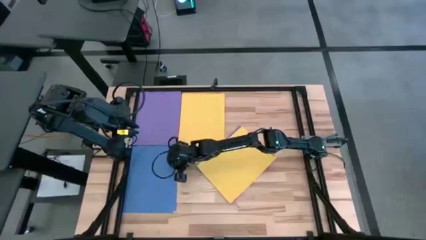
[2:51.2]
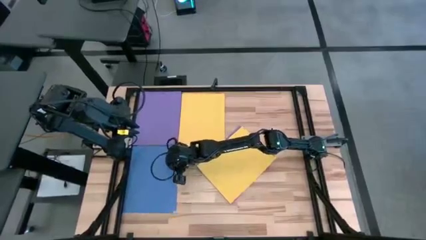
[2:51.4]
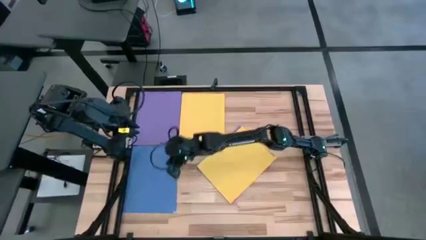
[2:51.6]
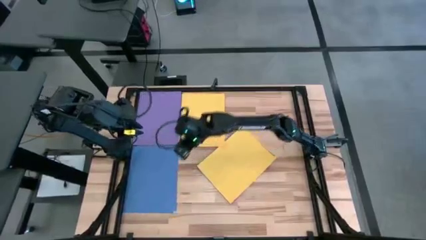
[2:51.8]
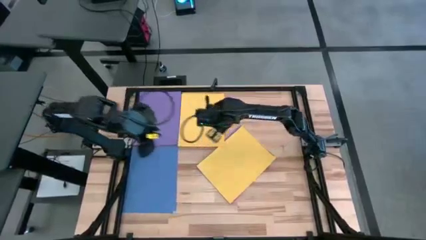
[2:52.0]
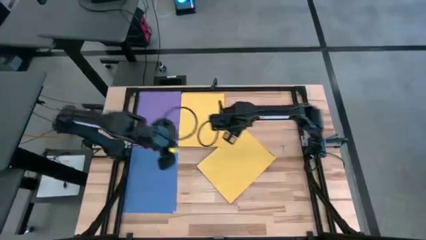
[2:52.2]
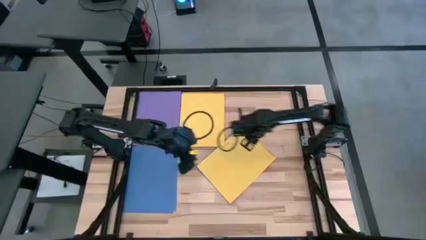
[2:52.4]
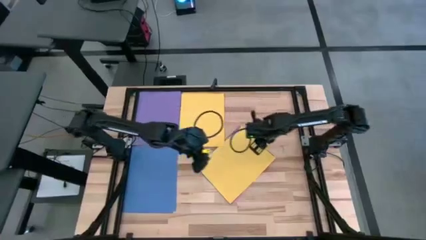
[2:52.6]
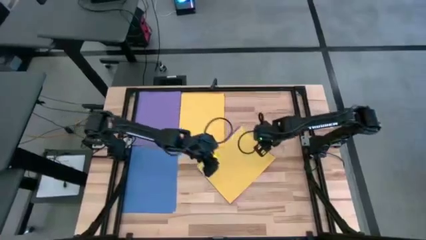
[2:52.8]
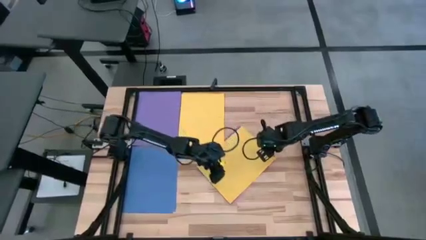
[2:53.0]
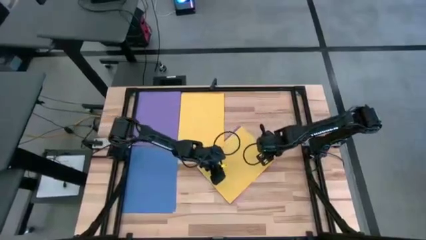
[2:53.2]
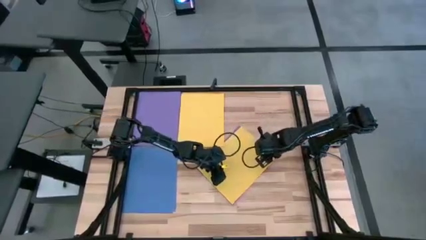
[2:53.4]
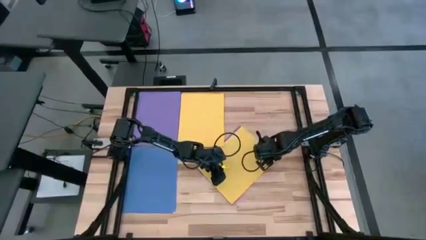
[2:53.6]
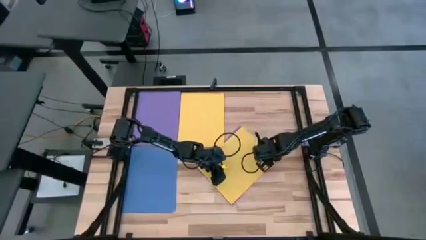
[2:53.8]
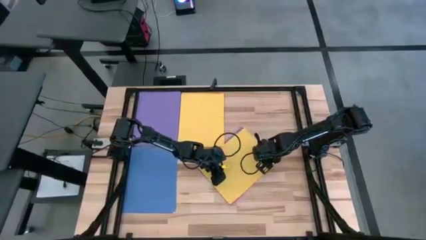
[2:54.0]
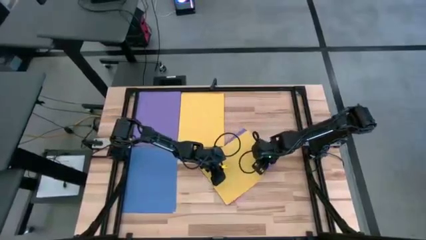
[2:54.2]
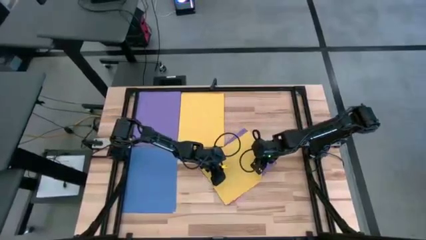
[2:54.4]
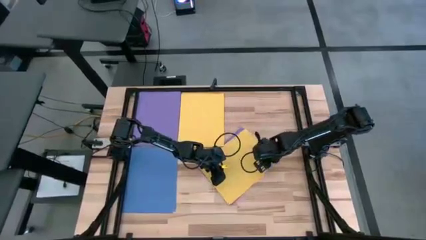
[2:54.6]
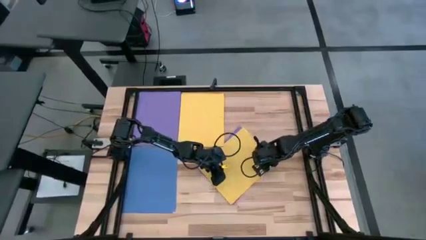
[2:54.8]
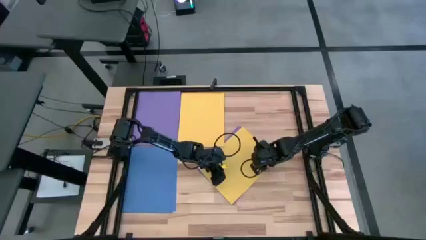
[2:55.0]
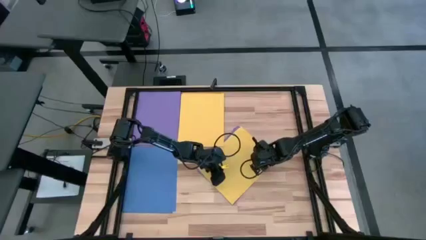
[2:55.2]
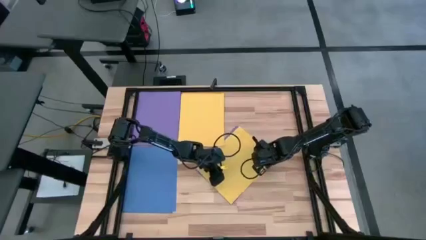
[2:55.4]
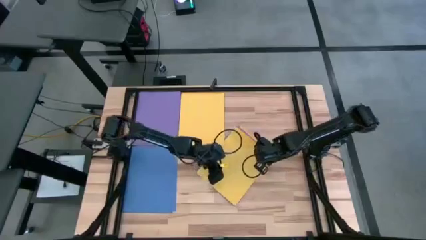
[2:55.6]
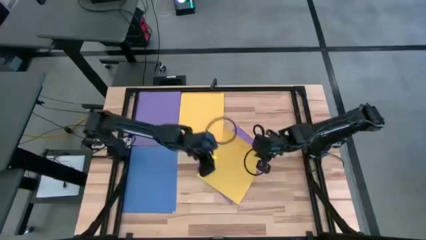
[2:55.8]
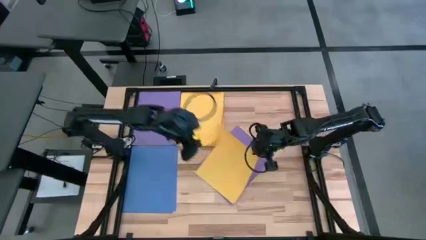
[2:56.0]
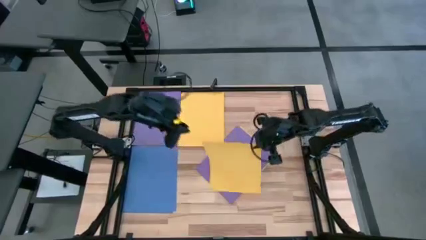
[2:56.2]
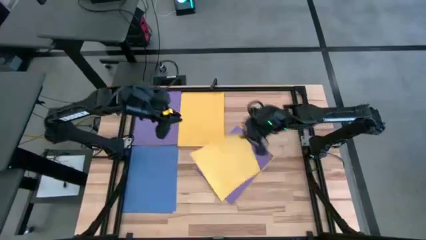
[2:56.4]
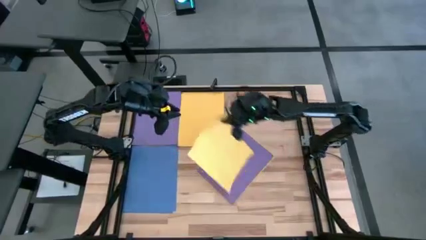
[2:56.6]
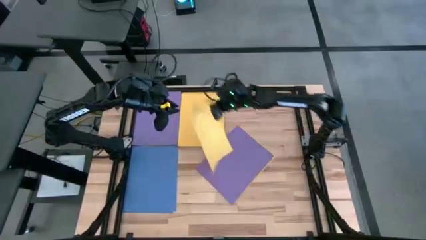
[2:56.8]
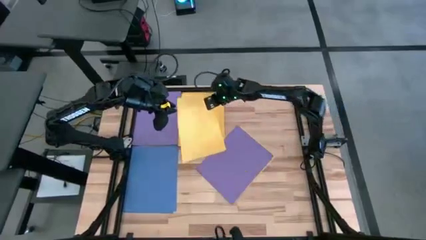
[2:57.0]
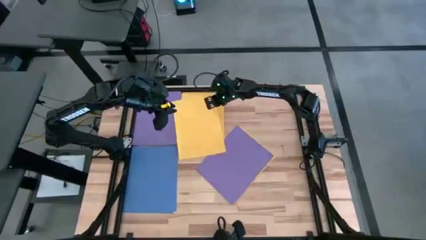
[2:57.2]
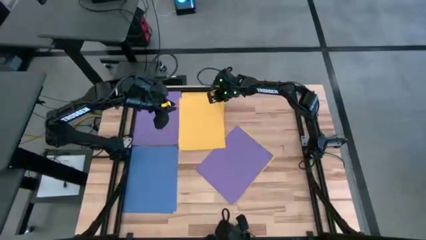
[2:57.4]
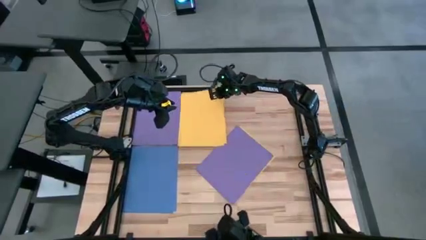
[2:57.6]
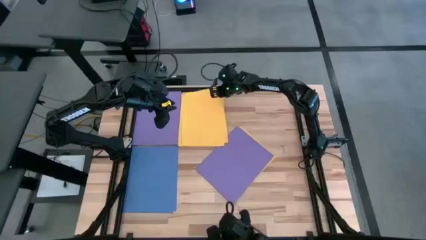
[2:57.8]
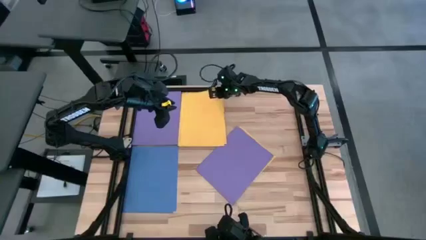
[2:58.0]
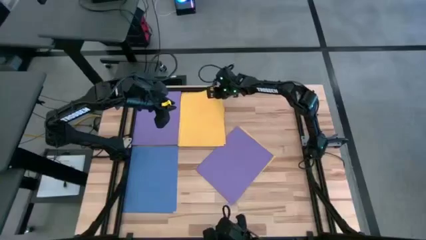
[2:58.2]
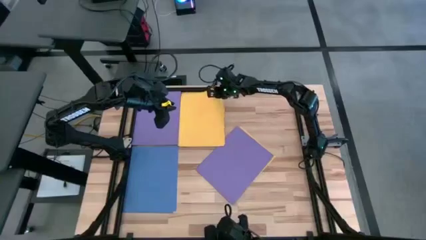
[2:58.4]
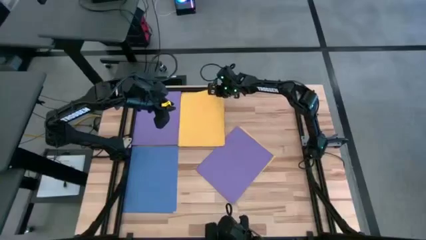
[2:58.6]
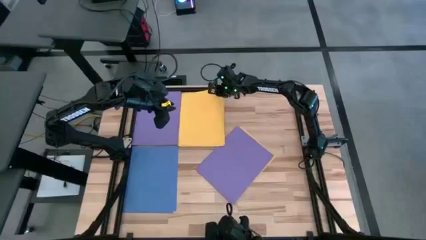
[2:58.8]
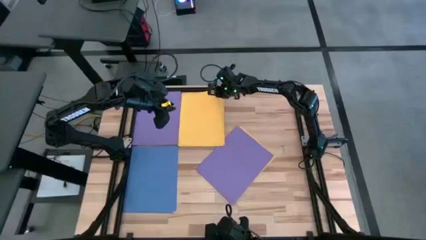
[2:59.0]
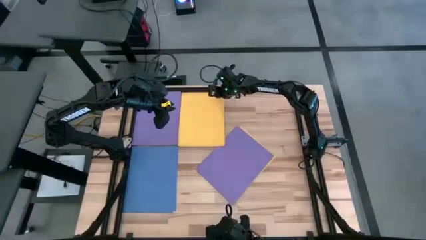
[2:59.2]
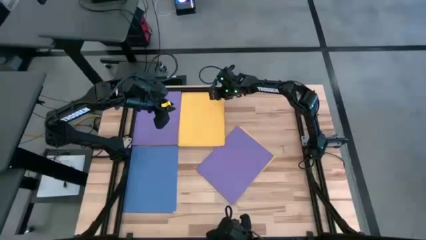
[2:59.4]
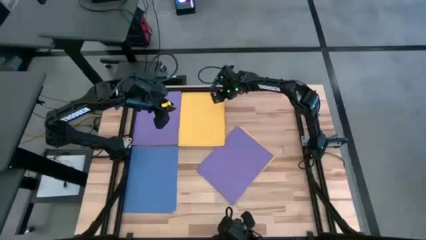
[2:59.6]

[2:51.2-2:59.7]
Task: Organize paper
Stack the yellow paper on top of the yellow paper

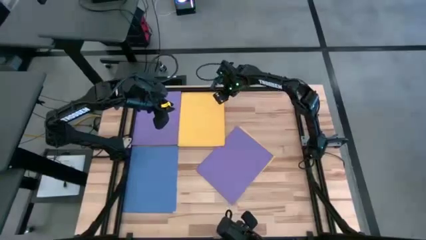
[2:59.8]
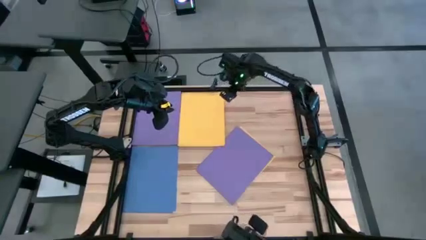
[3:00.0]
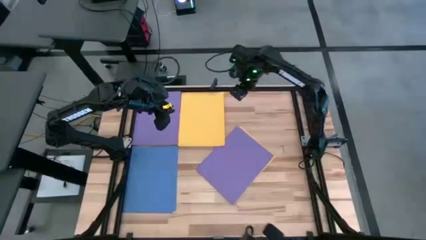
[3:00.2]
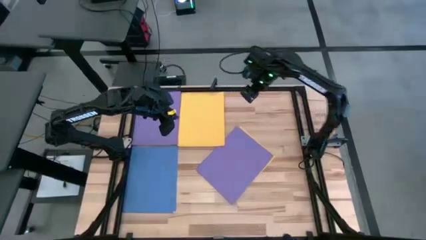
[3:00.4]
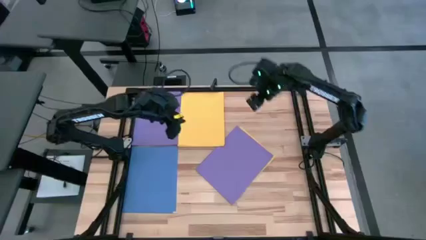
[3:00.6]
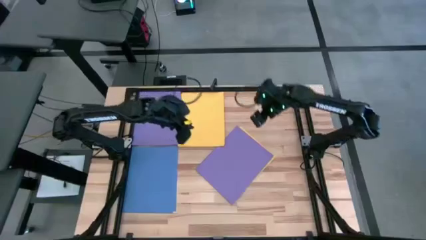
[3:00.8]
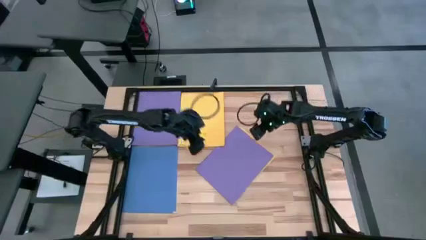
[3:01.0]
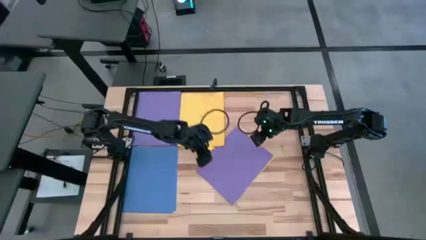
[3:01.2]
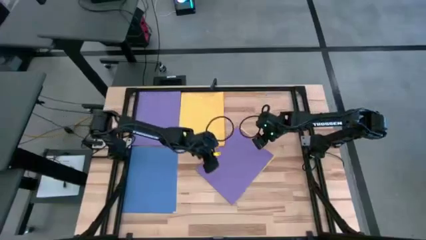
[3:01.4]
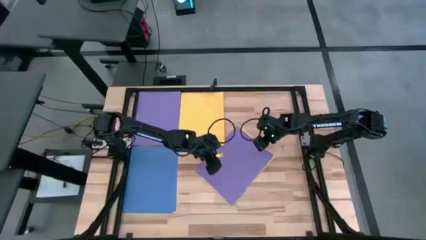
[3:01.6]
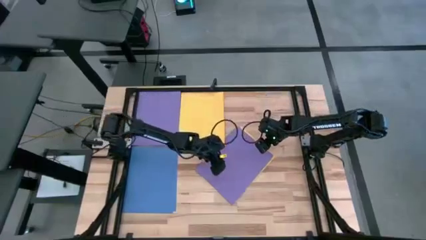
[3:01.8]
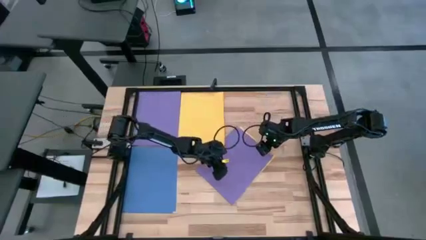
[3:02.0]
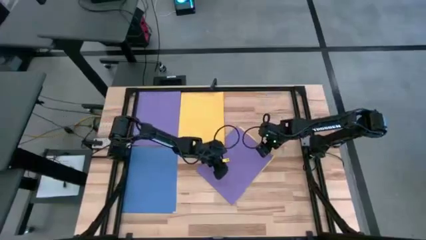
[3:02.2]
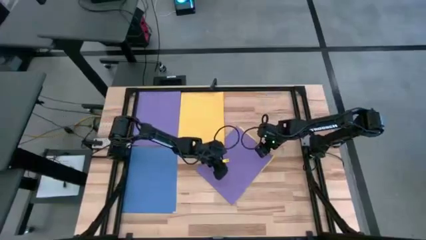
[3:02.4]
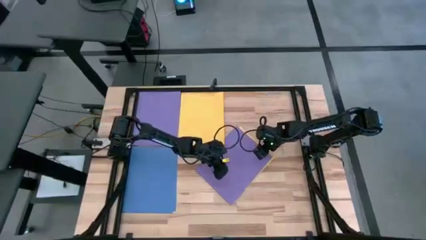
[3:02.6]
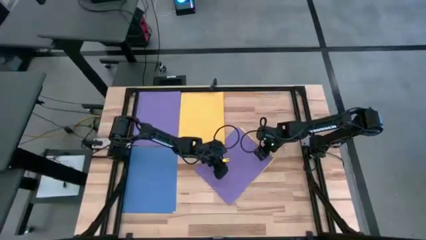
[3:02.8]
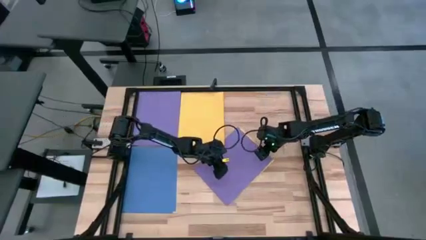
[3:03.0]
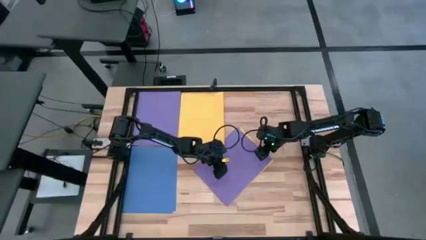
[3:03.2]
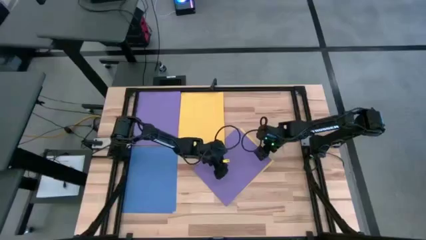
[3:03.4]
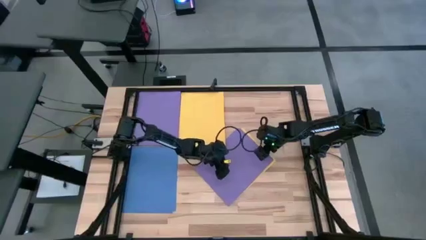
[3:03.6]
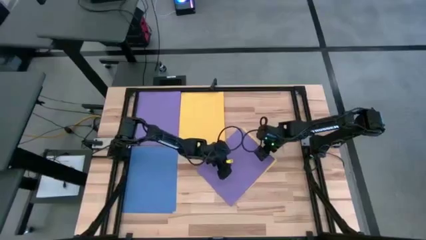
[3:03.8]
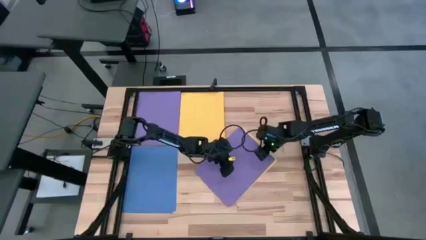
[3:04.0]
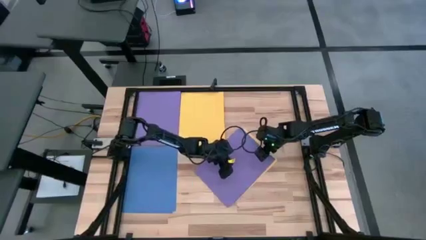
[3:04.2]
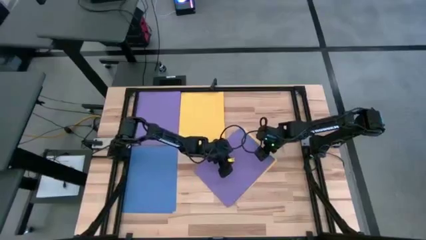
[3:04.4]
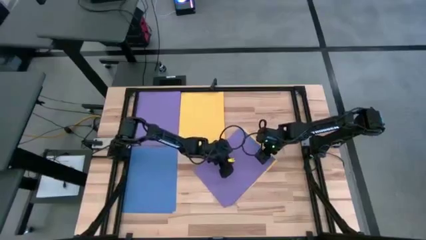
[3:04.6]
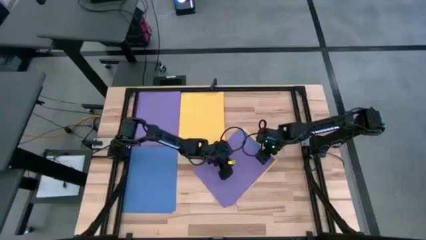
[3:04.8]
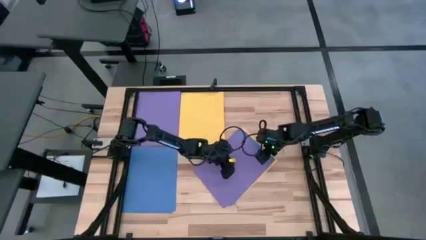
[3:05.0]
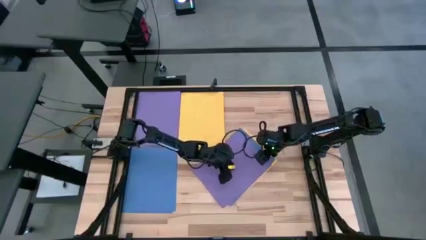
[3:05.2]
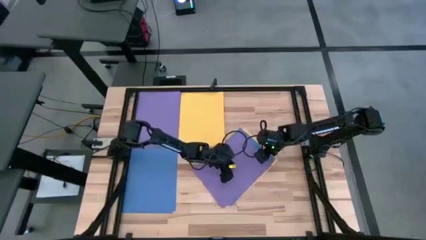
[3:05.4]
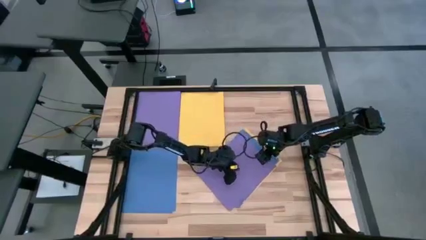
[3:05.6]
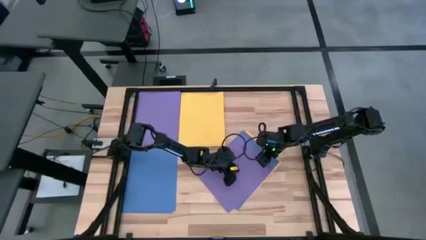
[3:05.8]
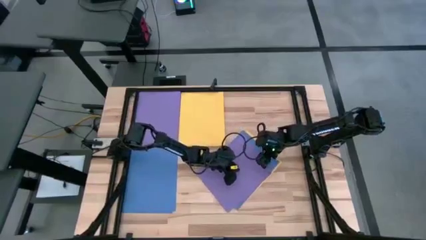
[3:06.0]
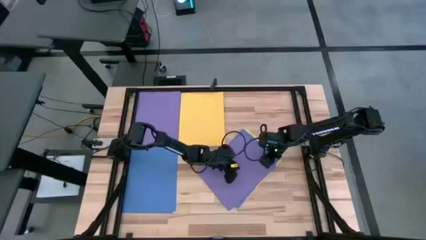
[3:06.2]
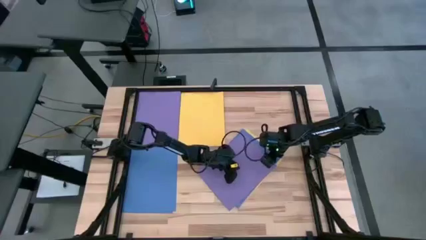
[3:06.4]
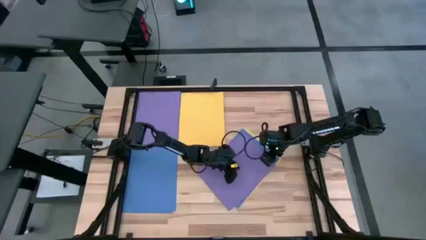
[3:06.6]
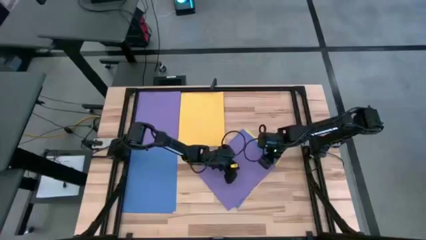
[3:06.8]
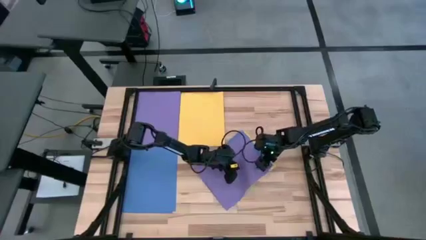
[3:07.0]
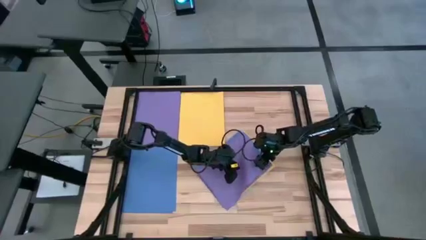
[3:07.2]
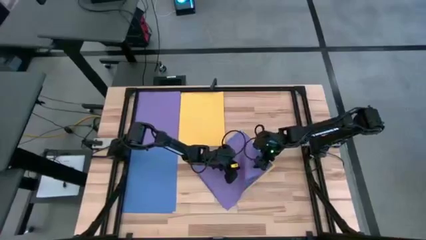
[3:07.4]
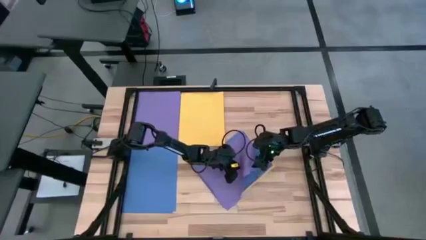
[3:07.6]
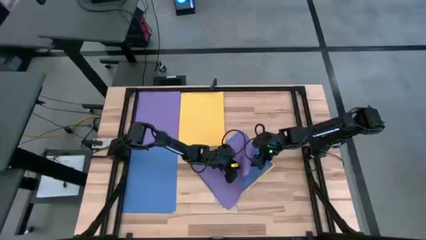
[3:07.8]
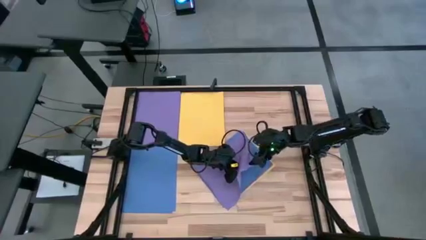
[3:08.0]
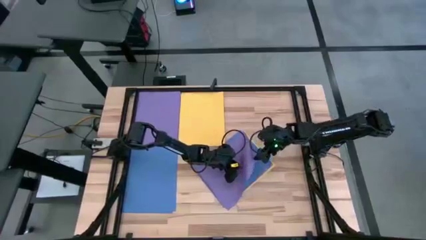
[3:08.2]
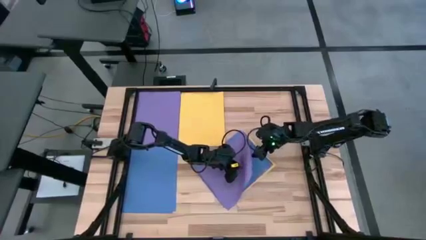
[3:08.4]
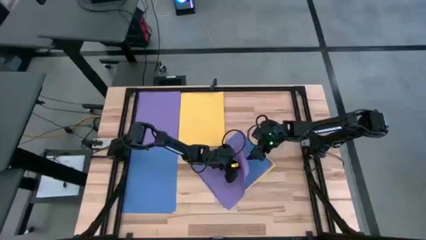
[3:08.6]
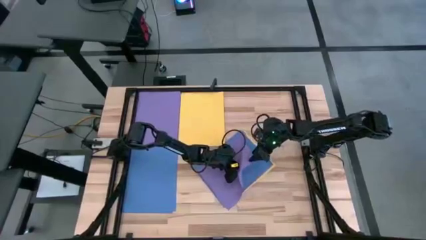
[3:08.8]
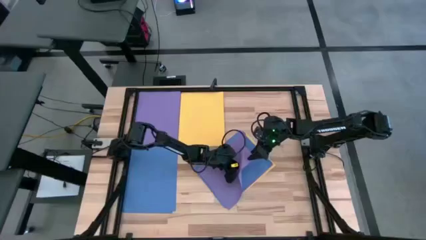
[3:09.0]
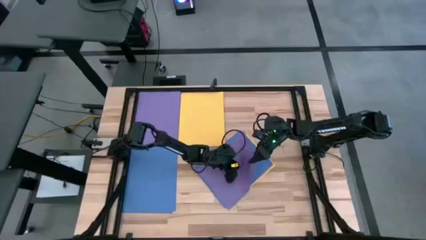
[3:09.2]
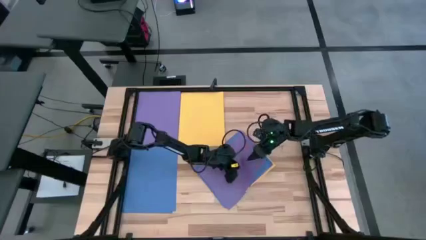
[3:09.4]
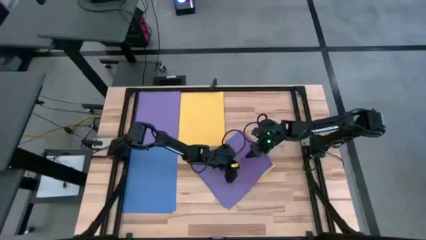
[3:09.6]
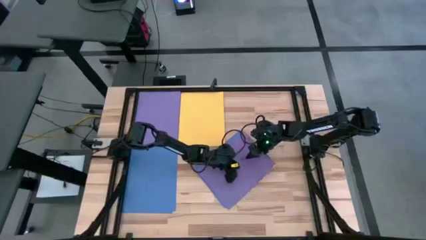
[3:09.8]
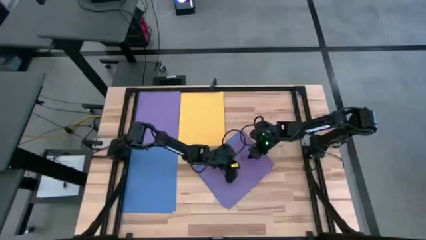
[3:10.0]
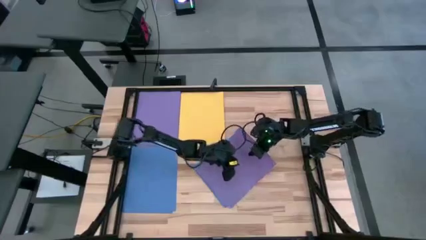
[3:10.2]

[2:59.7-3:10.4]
Stack the purple paper on top of the purple paper
